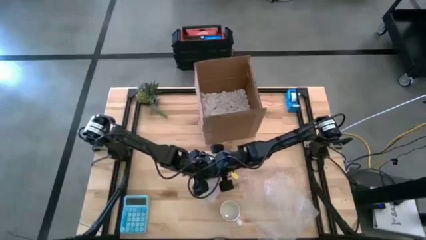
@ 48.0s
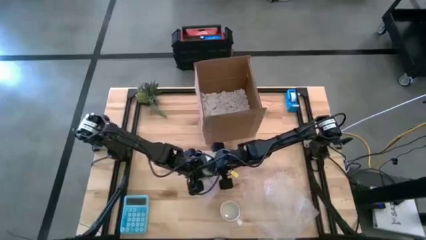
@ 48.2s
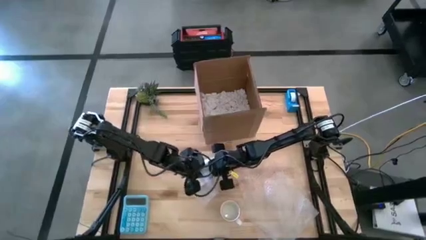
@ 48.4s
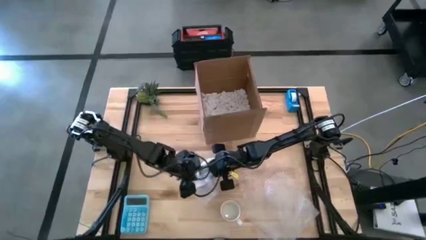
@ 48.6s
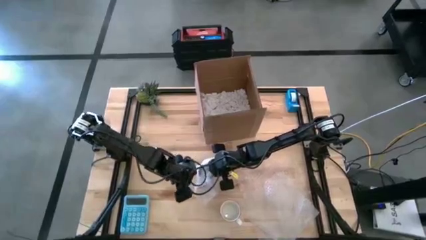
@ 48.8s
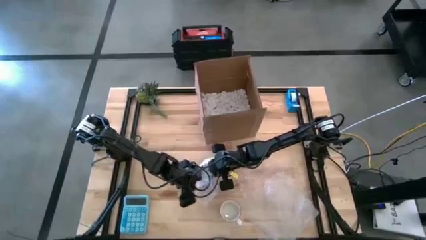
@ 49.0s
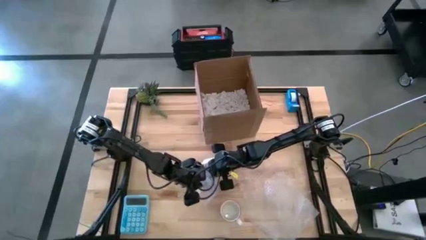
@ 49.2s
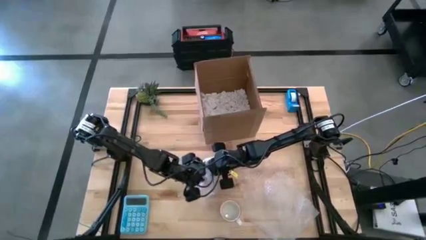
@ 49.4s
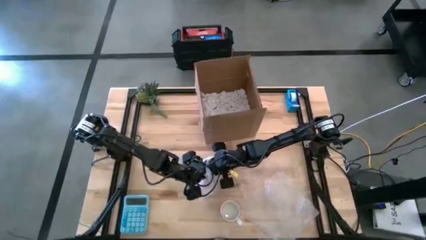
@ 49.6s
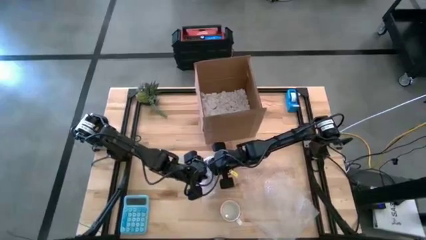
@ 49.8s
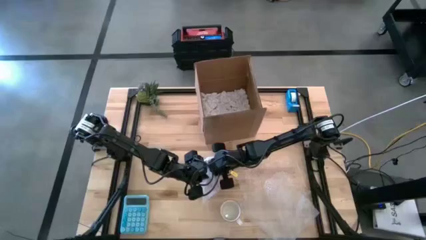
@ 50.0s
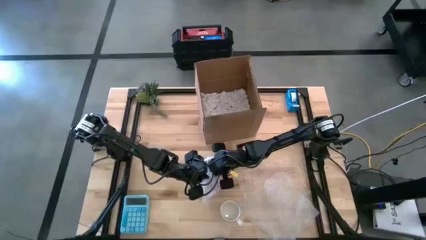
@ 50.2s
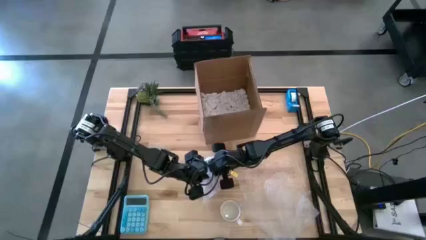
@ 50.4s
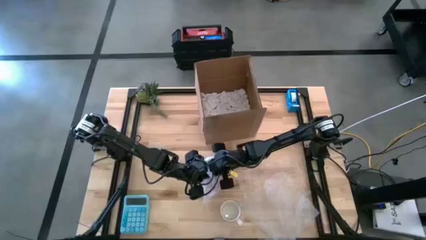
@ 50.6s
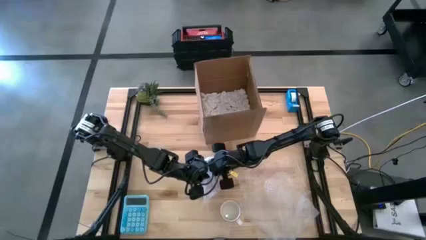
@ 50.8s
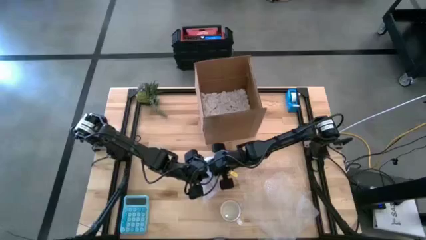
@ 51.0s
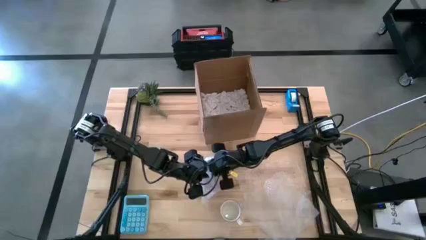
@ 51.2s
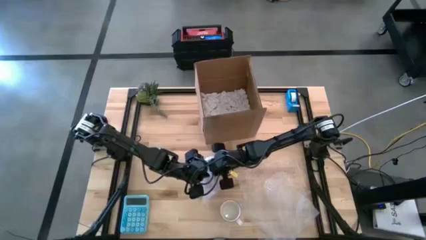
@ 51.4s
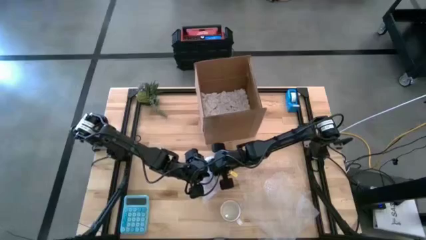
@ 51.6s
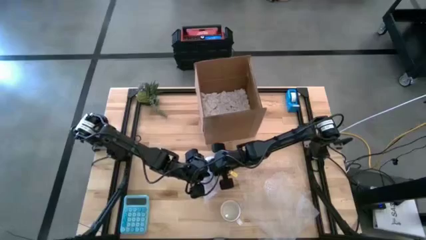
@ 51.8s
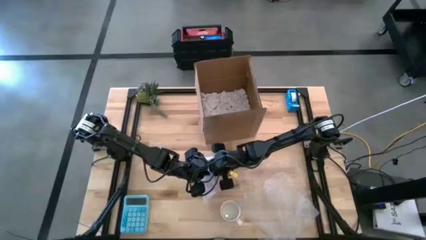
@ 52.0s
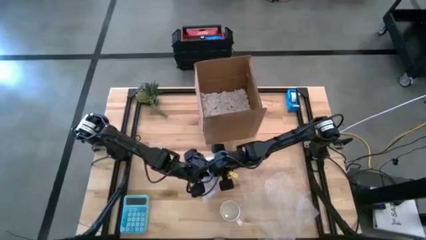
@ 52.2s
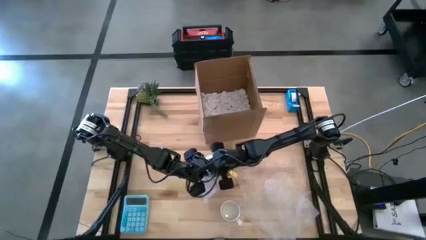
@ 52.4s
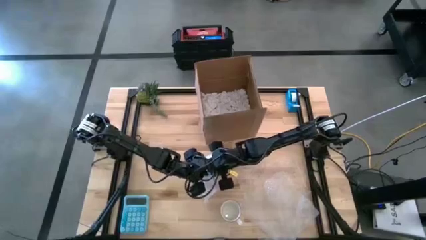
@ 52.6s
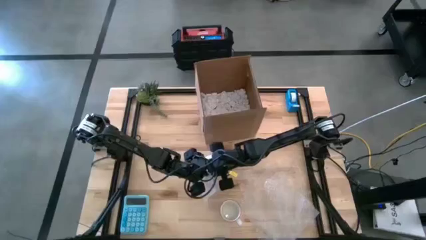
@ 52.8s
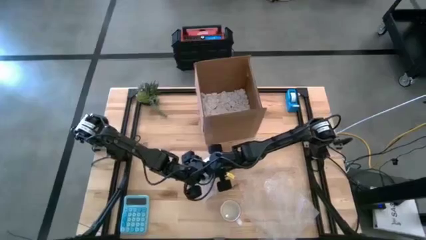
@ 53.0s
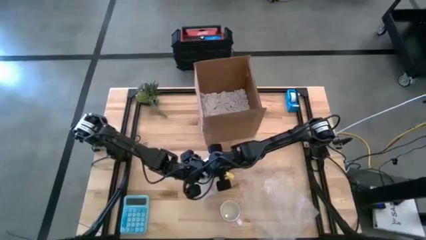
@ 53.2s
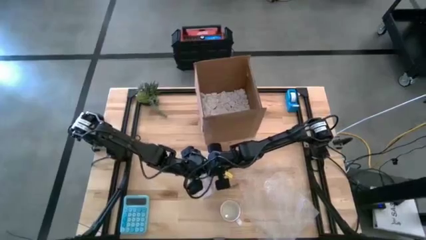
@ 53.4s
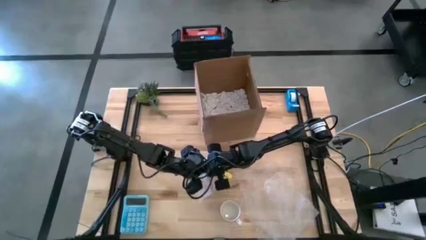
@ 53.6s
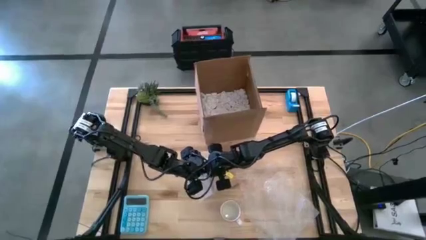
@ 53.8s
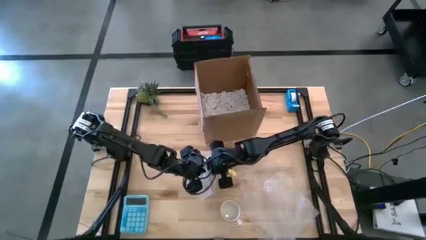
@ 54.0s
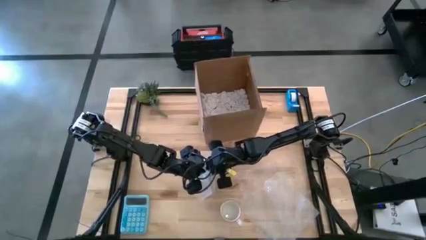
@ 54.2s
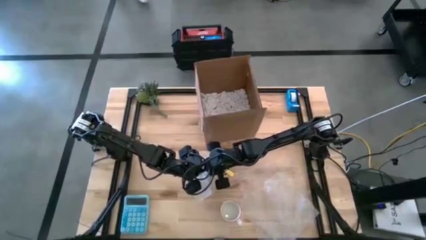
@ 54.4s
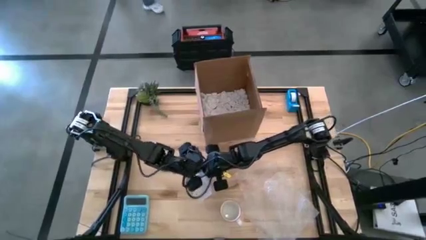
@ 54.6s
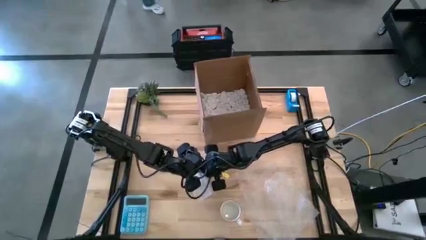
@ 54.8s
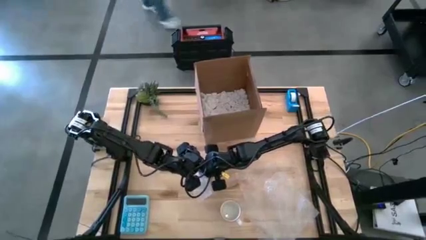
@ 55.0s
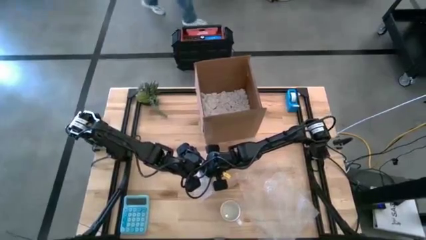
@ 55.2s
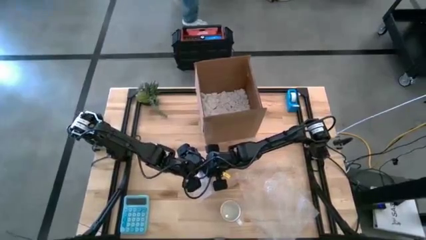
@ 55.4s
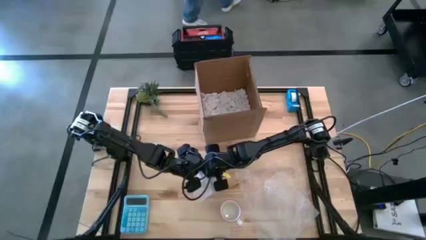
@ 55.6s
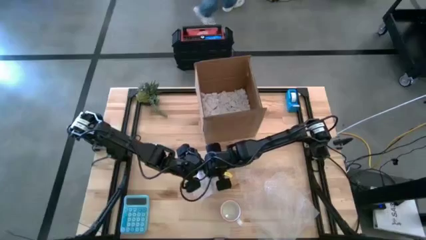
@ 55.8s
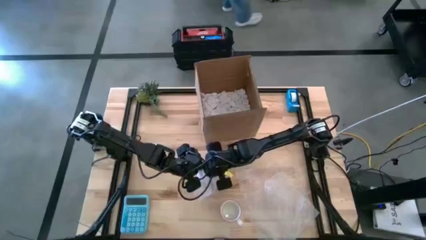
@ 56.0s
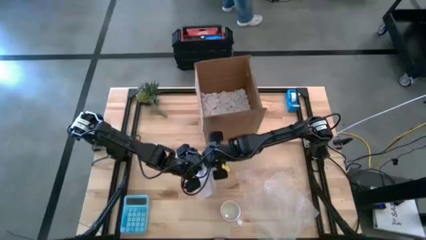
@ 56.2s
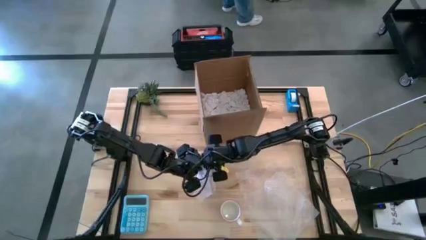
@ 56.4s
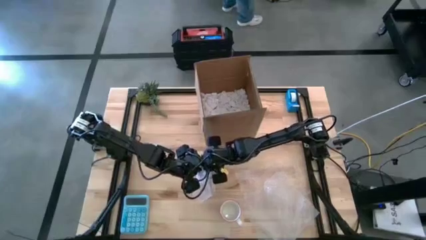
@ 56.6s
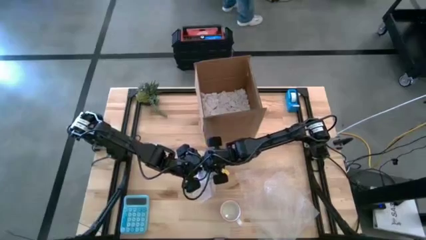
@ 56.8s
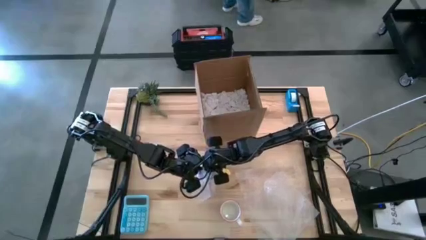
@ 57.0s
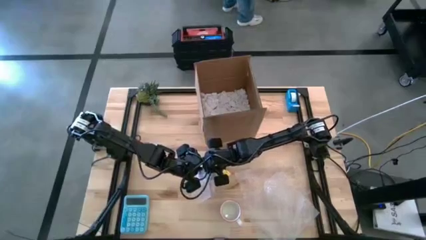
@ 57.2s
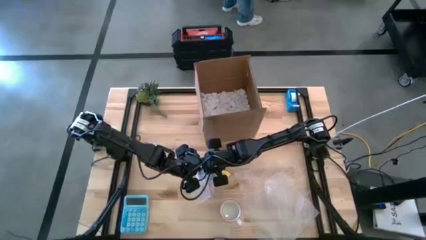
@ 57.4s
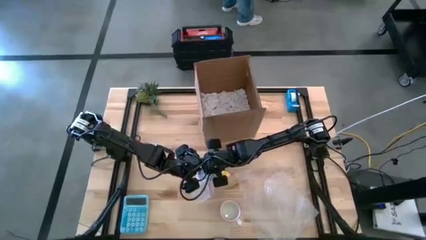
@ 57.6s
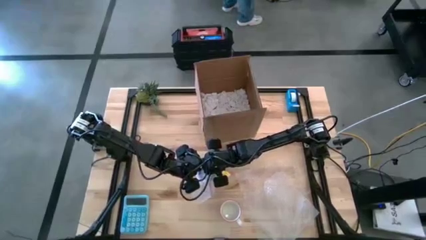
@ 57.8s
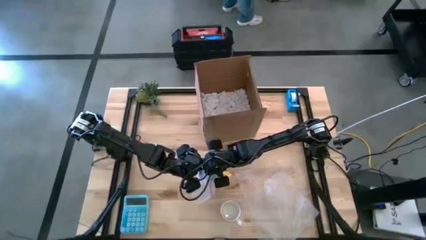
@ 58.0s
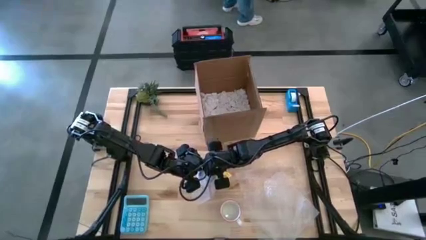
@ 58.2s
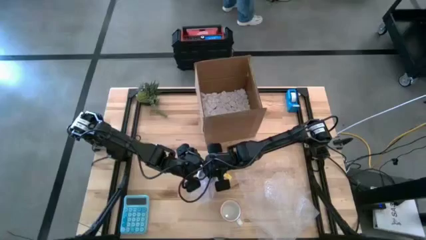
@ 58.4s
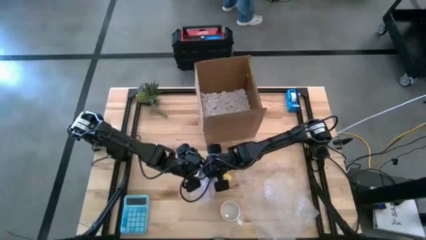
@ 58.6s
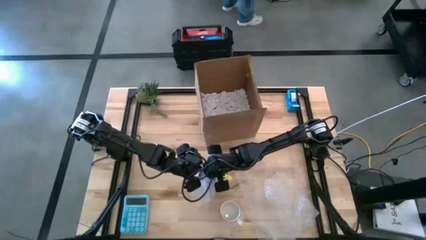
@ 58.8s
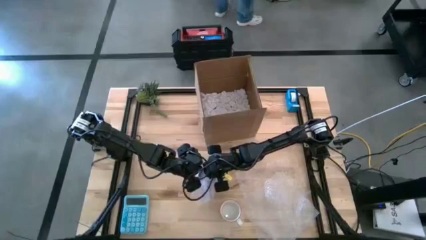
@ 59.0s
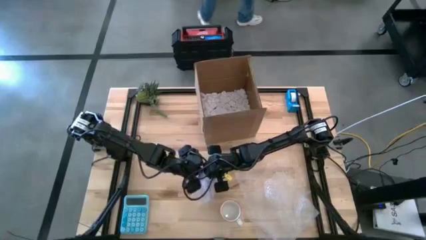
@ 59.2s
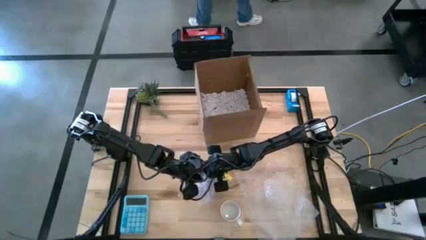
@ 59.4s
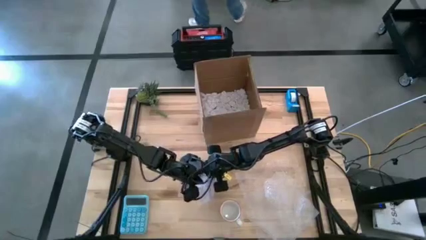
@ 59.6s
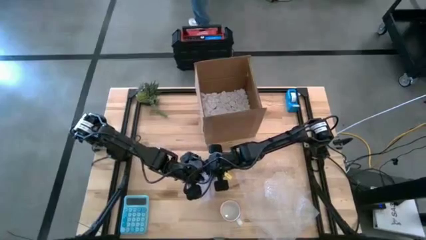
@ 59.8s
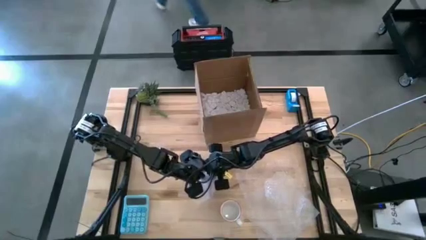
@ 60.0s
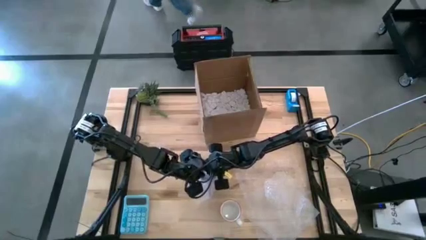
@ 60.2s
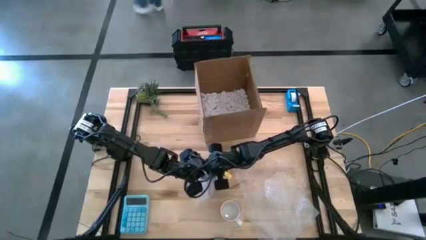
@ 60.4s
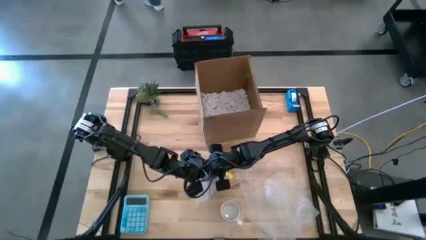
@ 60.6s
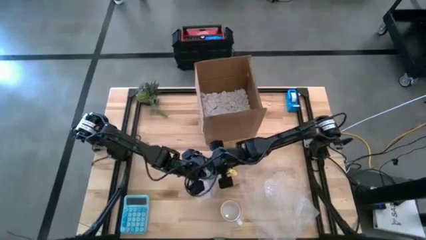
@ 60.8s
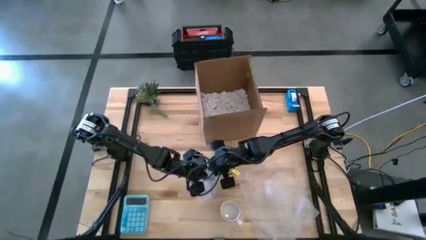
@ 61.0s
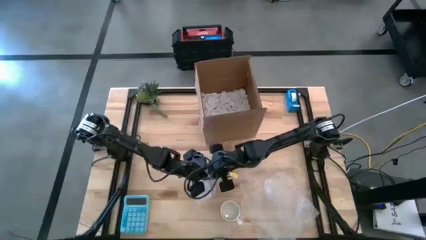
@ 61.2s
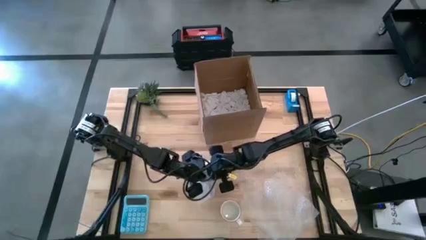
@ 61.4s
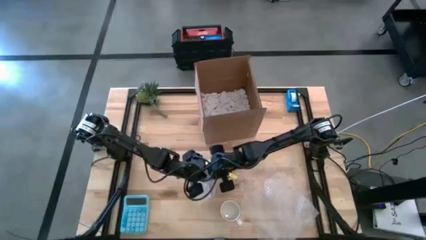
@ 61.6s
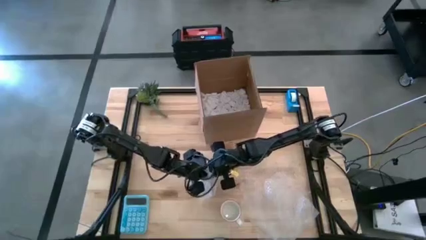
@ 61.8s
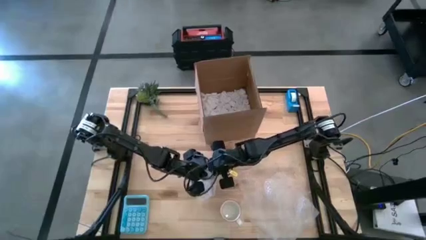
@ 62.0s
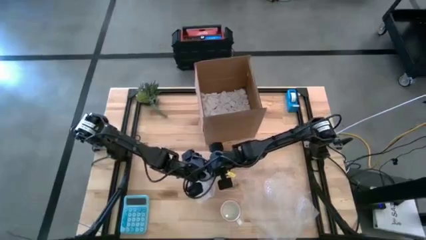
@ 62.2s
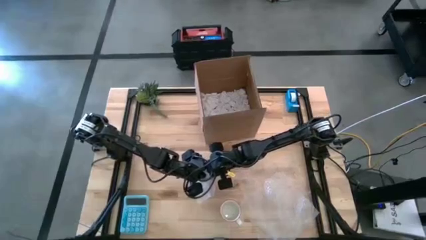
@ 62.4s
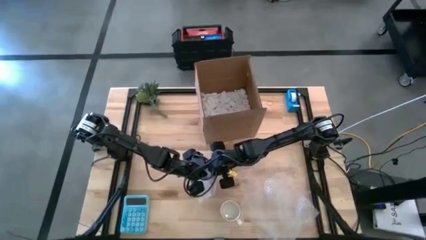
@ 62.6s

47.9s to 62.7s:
Task: wrap mug
Wrap the purple mug with the left bubble wrap
